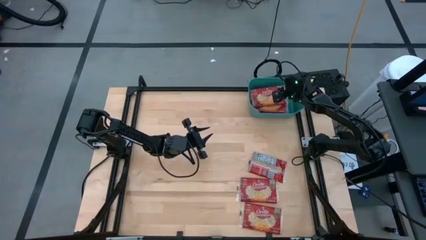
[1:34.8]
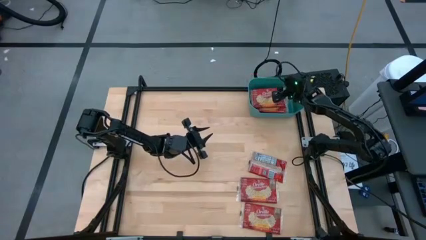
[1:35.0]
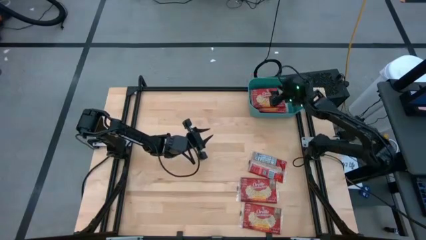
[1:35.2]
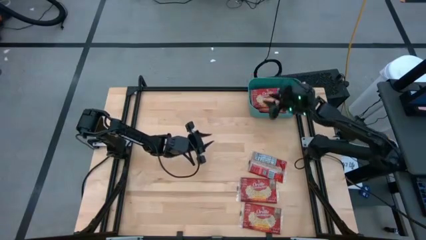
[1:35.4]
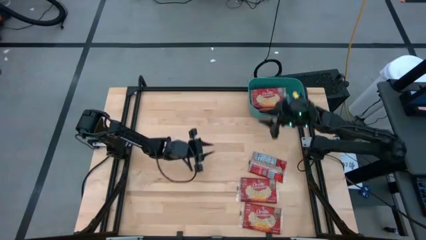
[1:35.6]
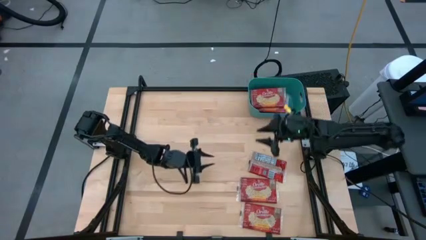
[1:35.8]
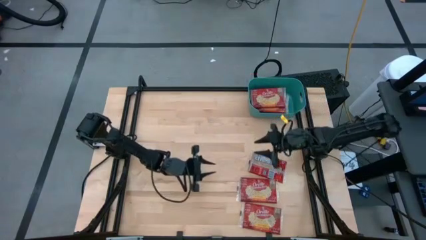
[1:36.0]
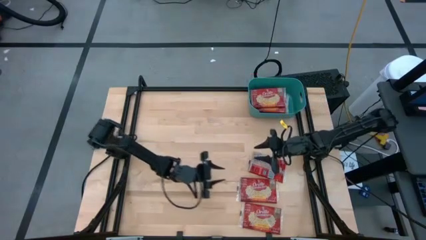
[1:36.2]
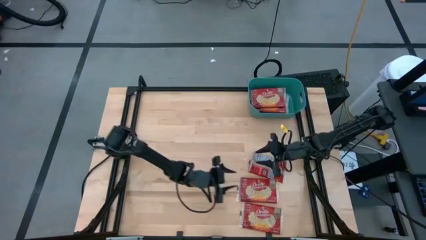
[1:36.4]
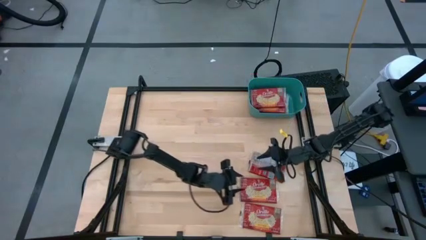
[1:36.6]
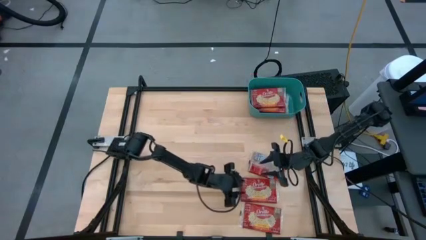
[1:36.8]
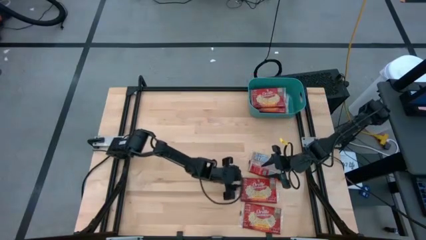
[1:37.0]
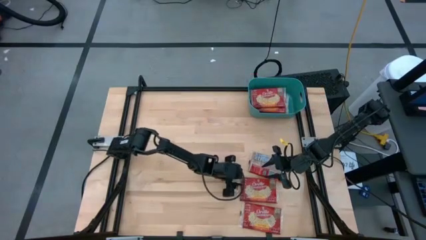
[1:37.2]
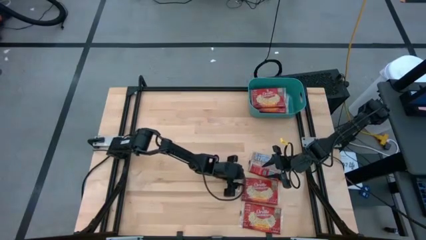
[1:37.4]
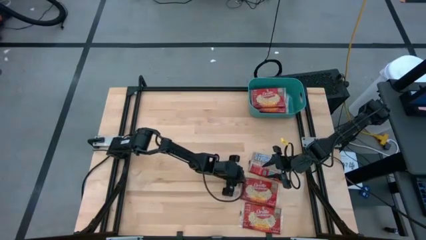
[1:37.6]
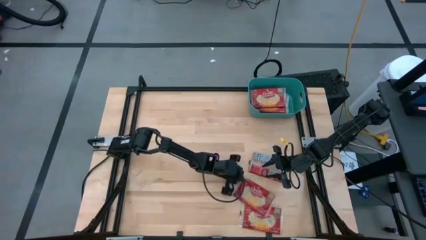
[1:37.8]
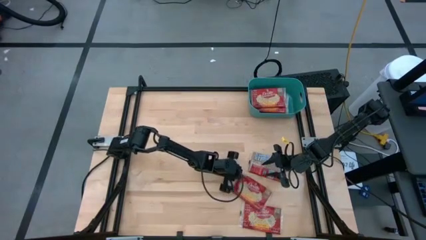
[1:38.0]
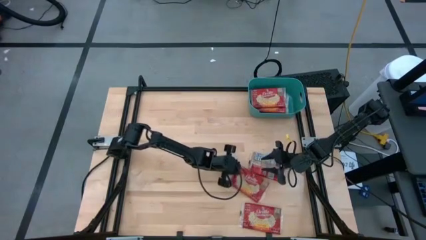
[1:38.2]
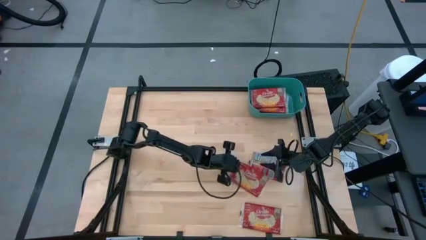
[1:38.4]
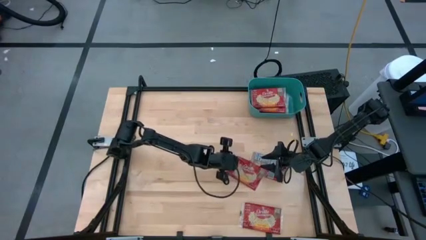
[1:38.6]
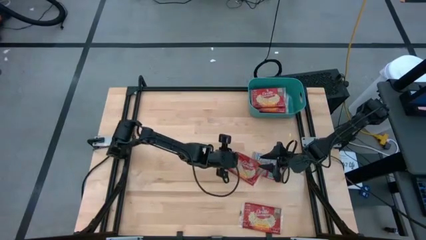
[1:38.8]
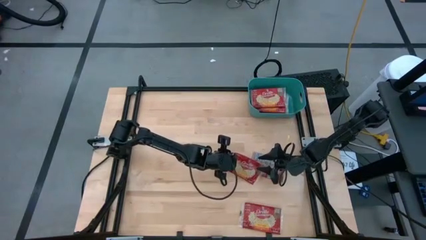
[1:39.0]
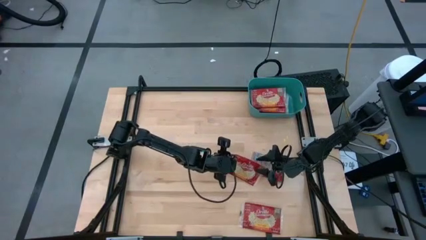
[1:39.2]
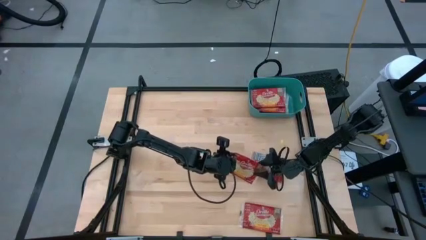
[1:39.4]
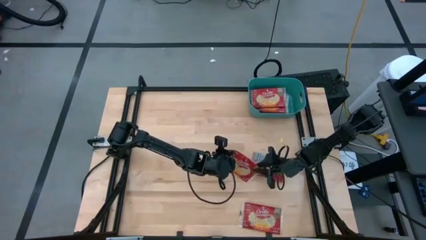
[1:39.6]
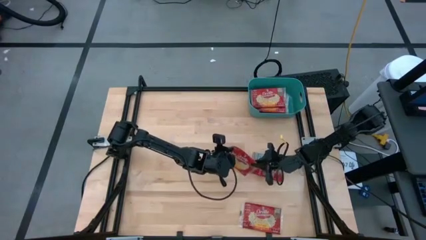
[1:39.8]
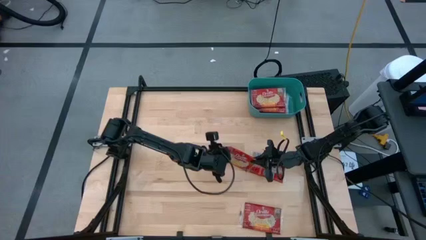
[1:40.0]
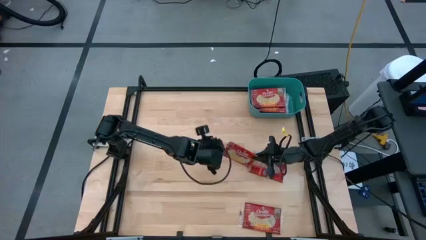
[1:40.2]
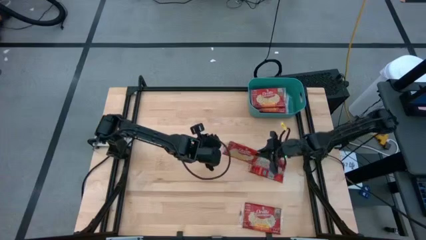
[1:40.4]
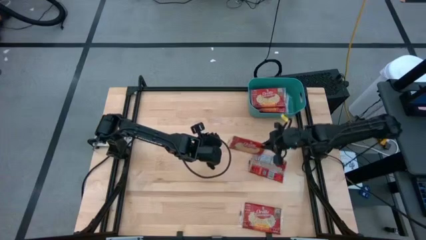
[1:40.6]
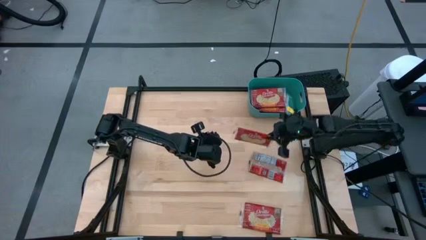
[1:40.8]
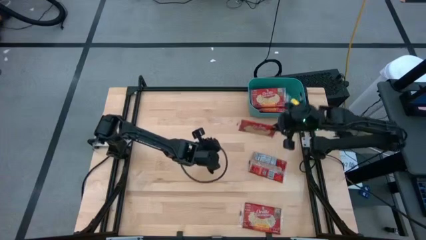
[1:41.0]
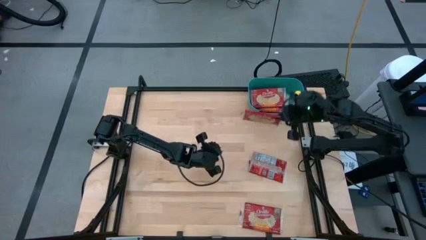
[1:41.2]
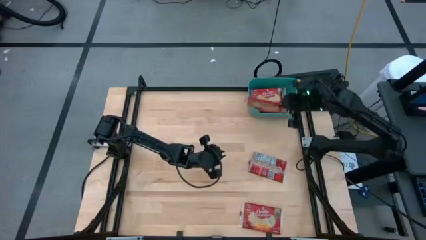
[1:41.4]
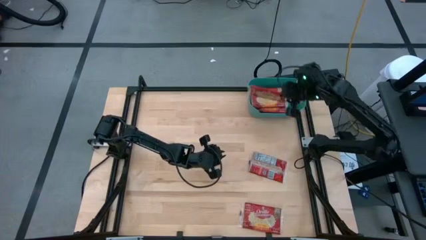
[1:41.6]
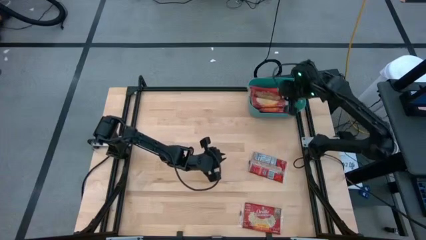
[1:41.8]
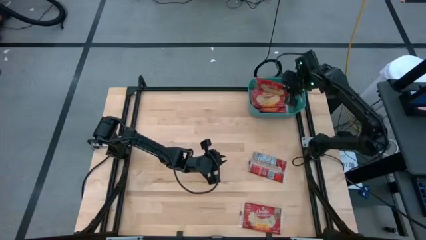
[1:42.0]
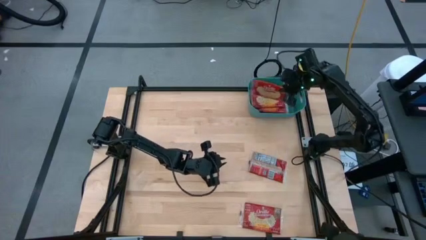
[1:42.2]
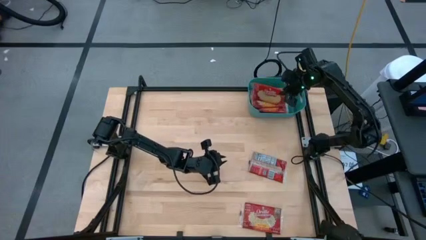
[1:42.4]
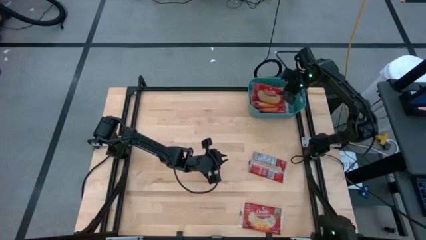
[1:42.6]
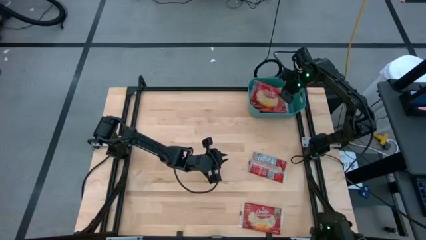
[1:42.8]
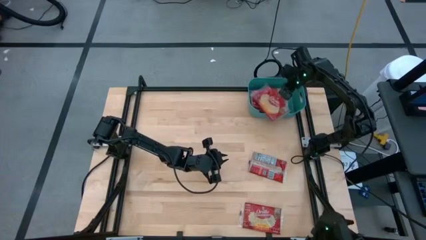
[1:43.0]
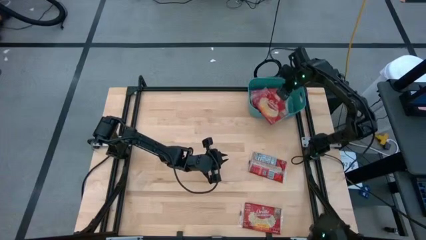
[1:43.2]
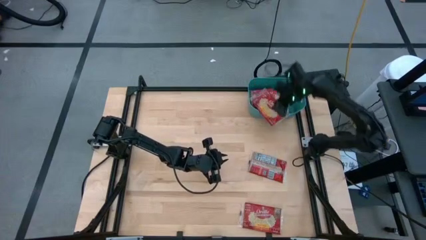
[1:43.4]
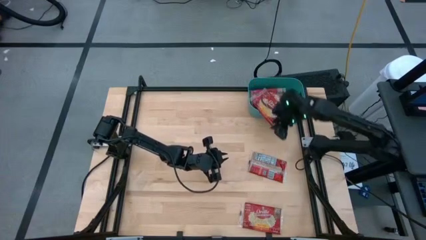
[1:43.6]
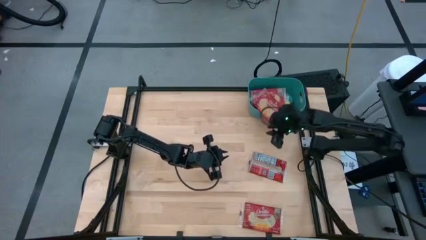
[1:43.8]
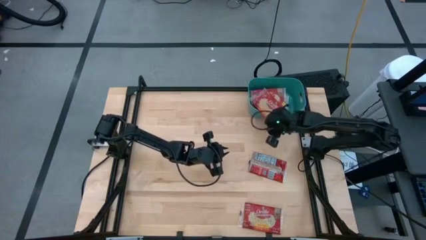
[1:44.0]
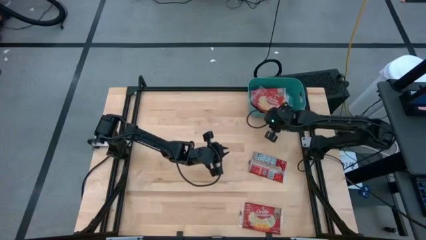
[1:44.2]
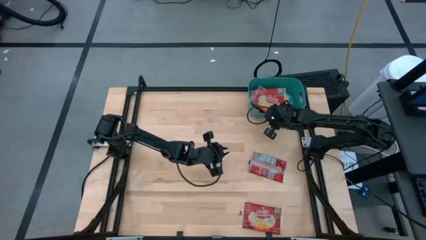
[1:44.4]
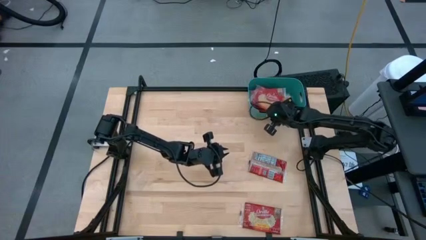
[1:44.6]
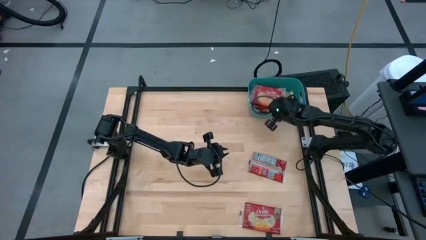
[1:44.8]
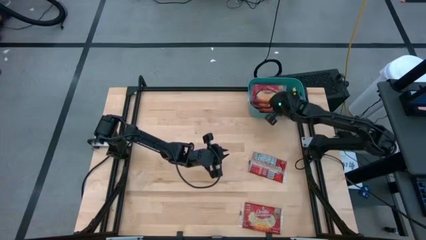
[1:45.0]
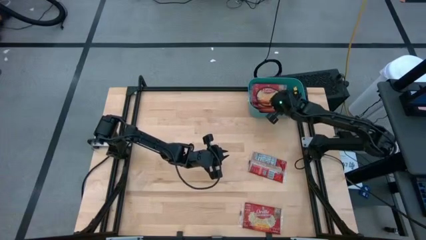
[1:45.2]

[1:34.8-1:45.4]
Task: Sort popcorn bags into baskets
Put the red popcorn bag into the blue bin

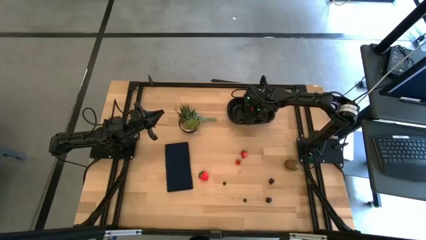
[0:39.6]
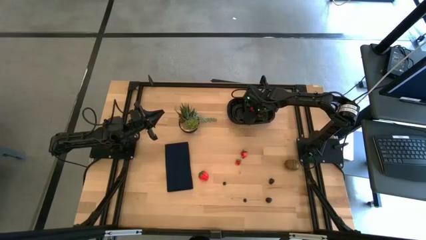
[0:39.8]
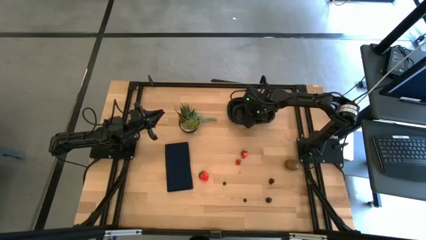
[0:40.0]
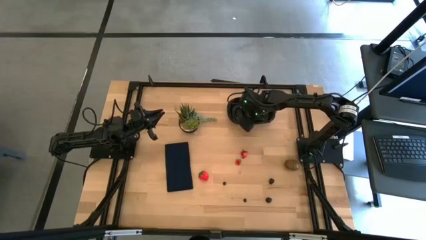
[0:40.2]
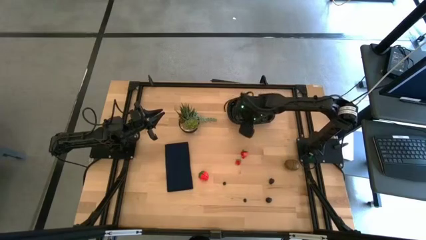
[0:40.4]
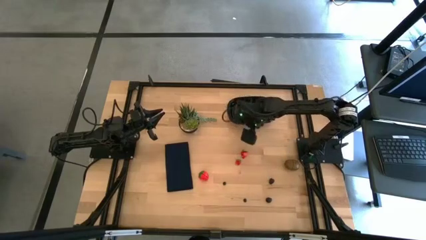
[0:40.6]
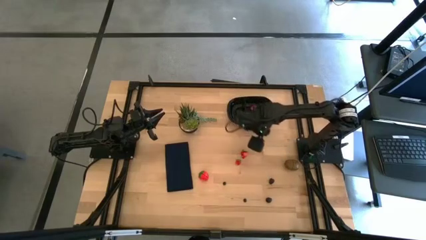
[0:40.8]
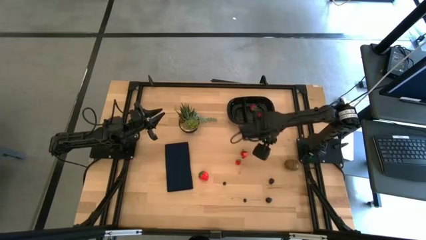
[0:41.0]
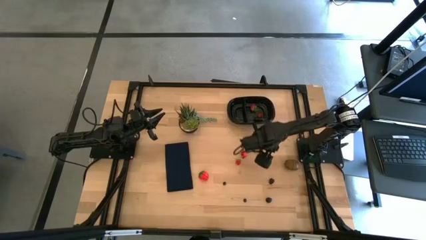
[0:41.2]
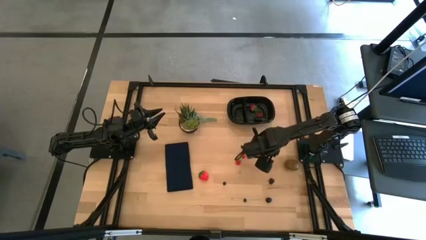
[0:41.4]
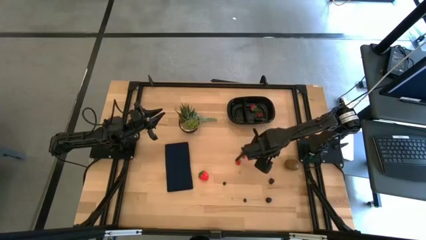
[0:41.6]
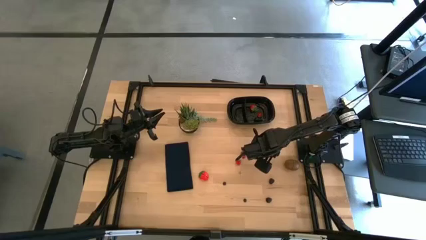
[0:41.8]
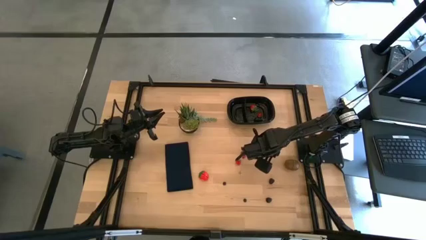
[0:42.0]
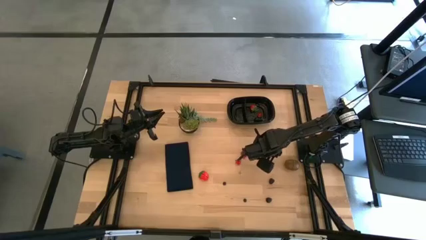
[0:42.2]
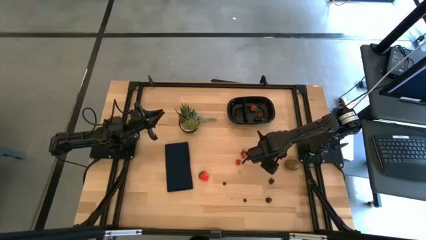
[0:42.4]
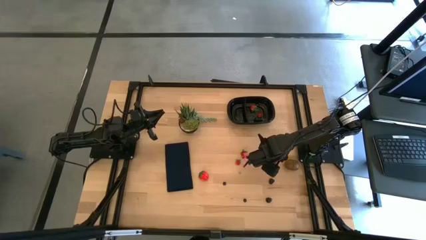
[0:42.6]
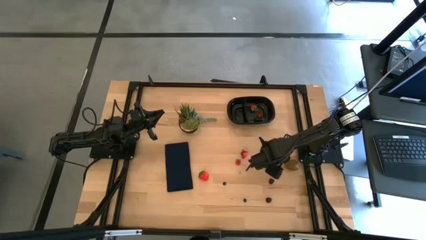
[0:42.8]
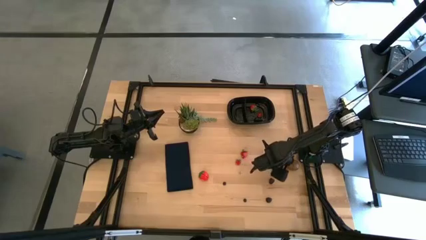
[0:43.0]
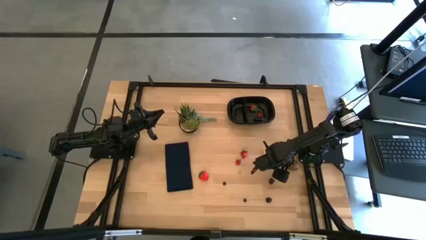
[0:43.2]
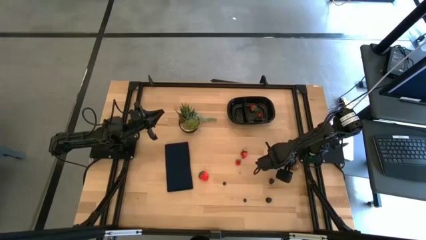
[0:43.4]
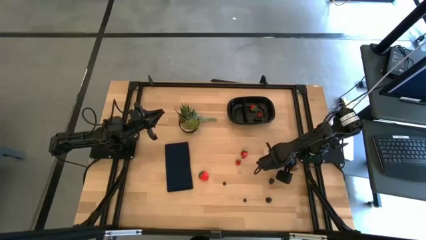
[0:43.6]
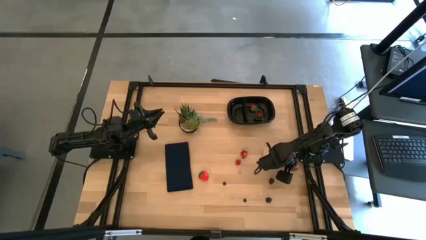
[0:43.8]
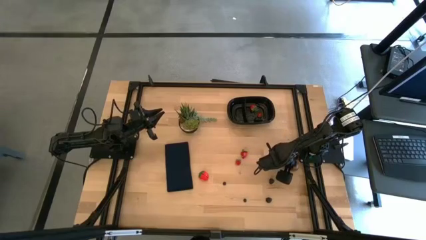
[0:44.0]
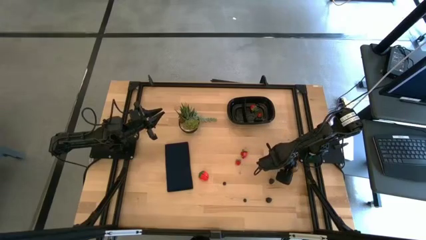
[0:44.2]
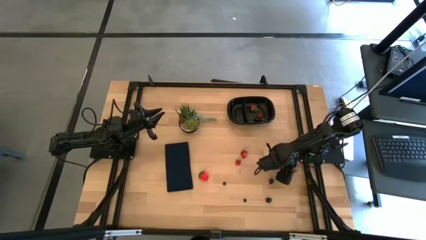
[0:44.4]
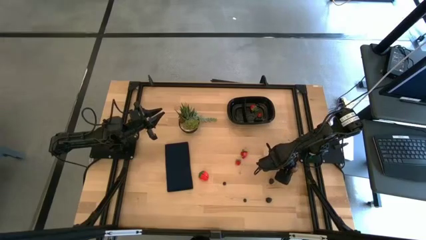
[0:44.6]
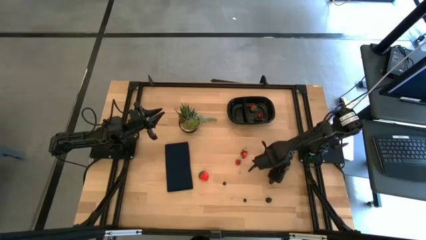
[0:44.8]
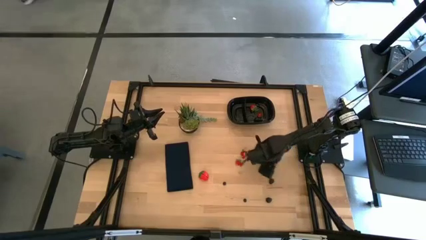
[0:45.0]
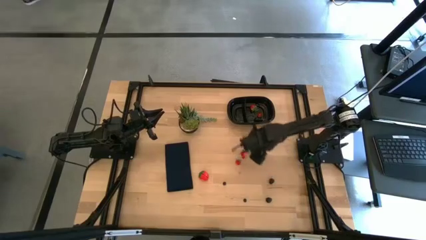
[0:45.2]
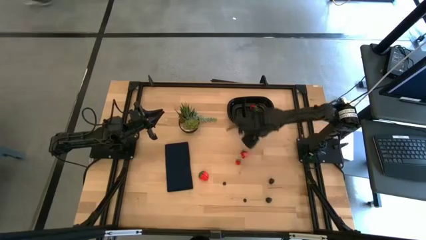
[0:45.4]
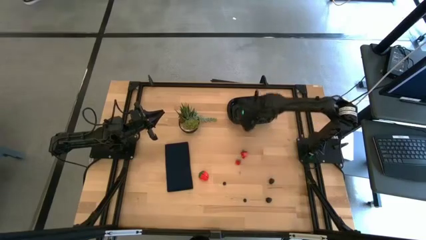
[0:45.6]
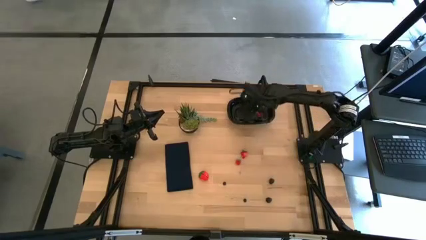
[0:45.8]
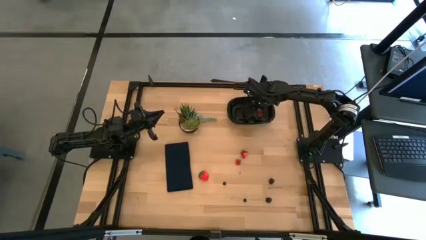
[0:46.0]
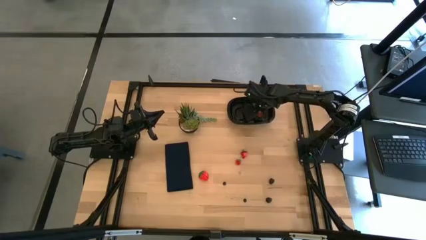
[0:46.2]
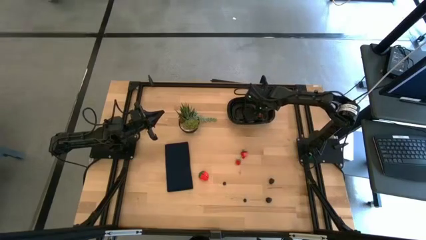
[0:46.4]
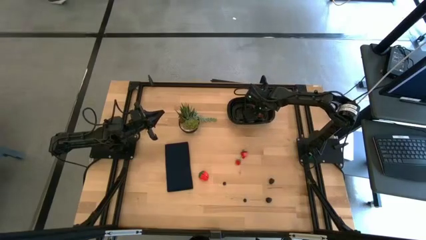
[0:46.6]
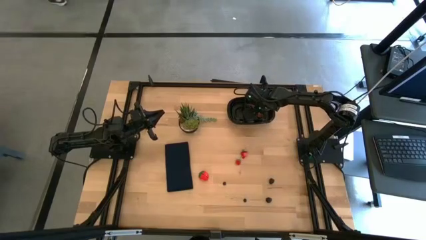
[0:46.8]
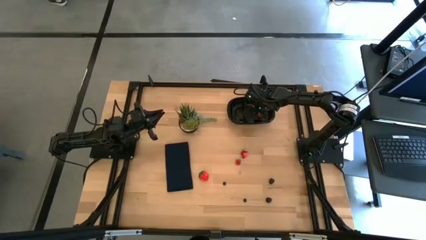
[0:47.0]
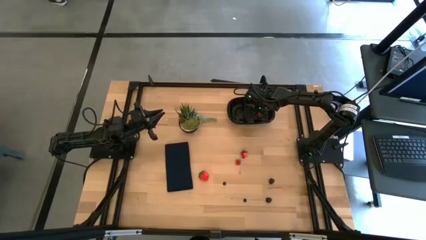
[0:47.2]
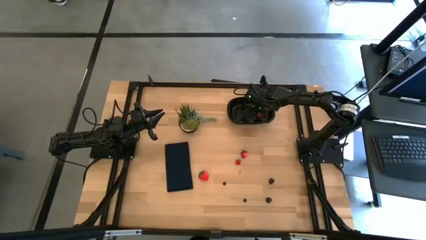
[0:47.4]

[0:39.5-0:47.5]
Task: Pick and placing Produce into tupperware
Put the kiwi into the black container
